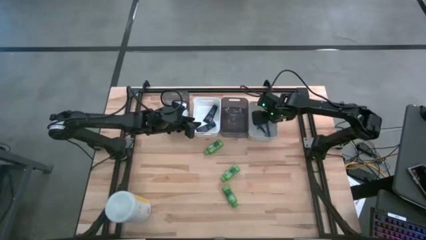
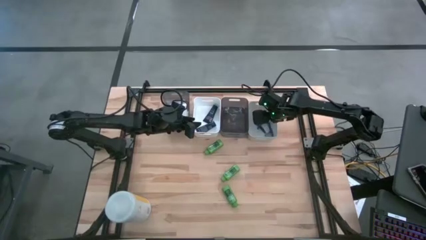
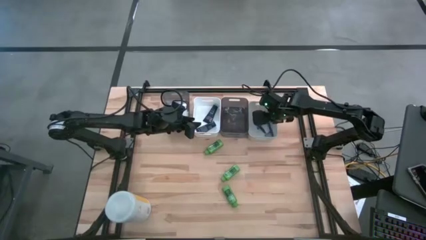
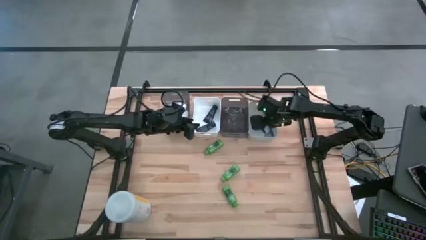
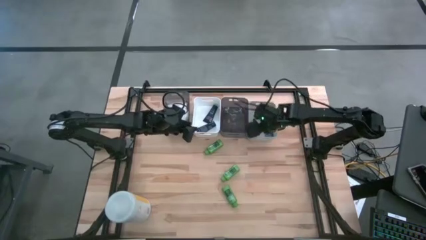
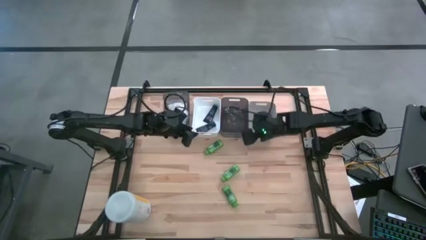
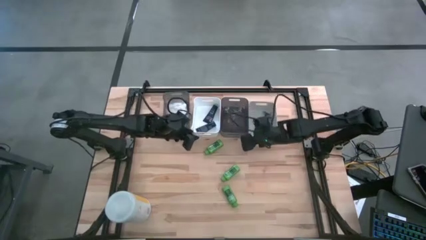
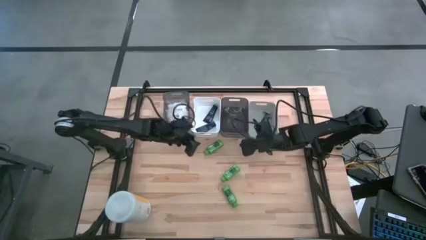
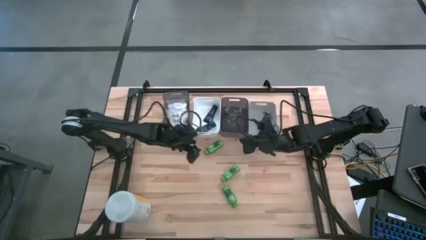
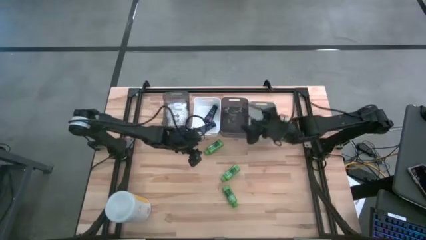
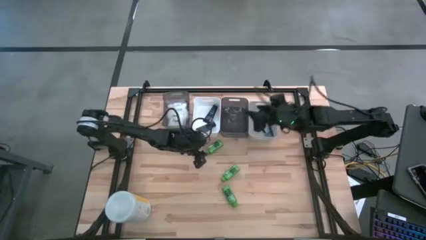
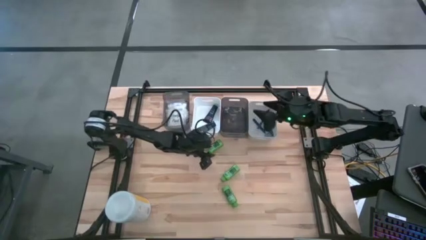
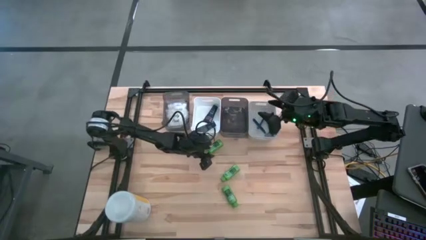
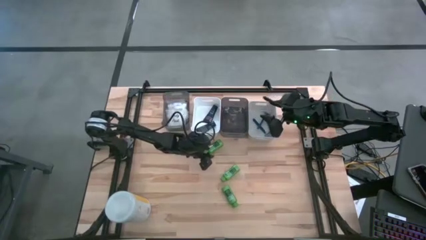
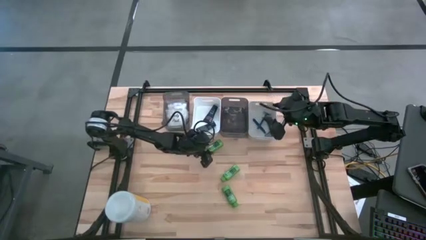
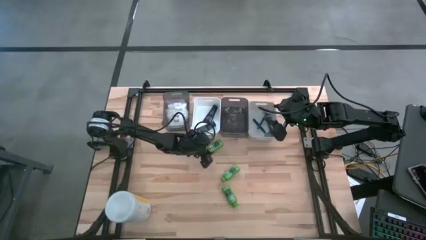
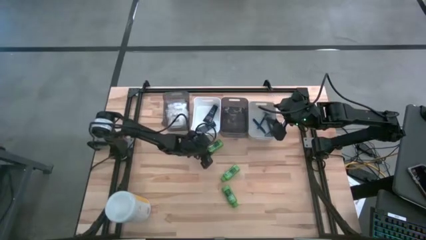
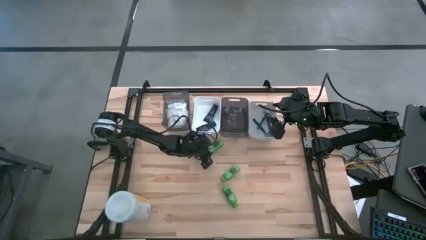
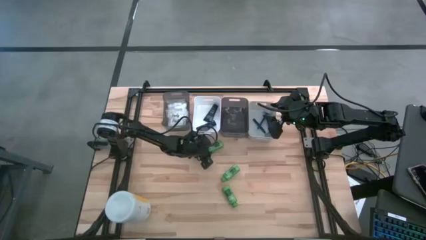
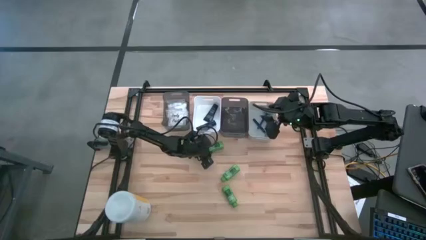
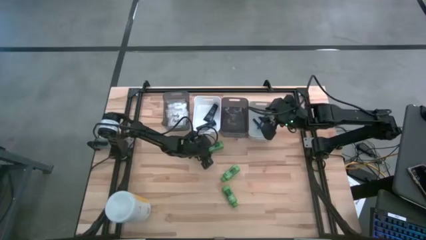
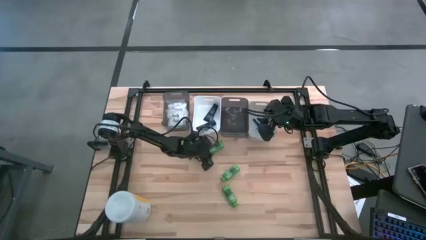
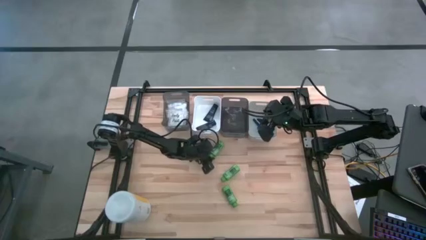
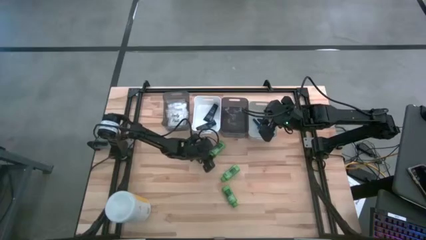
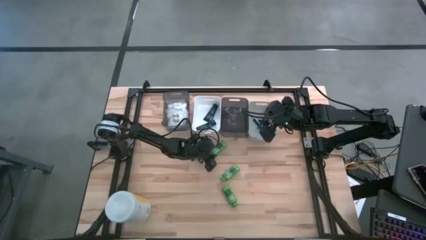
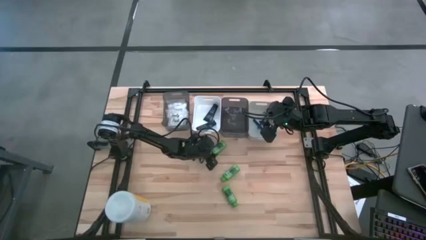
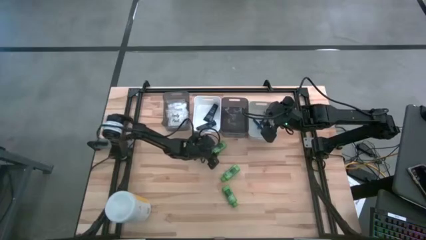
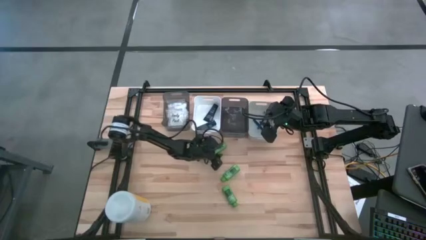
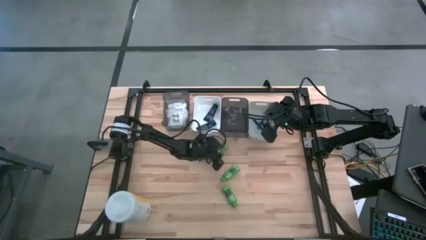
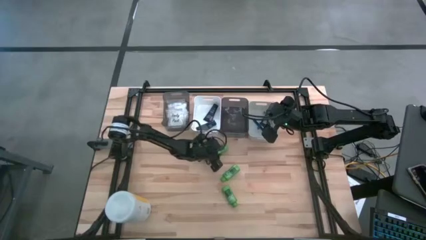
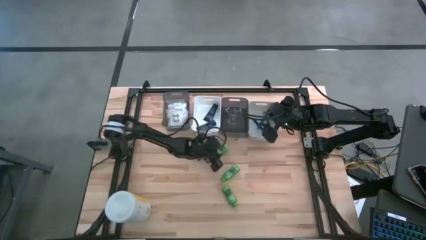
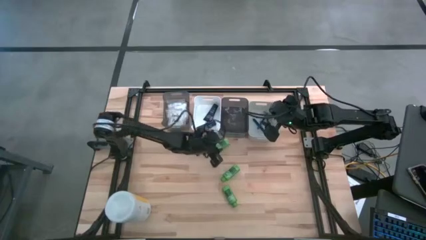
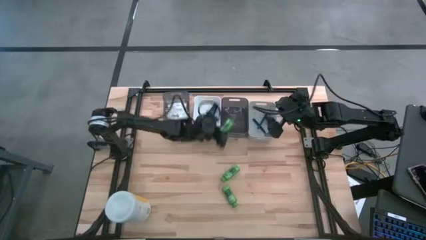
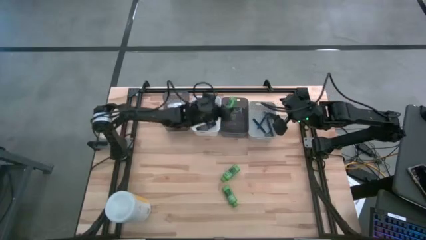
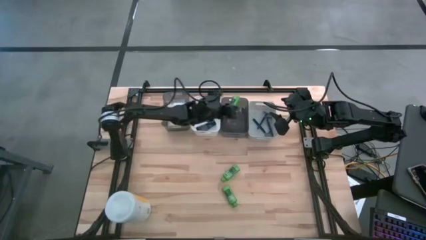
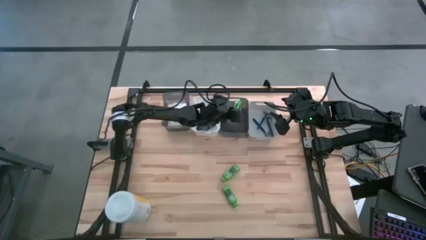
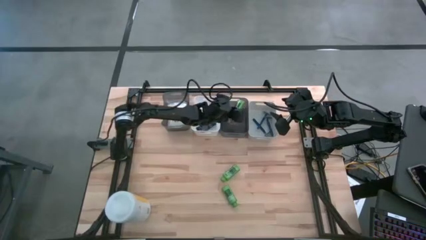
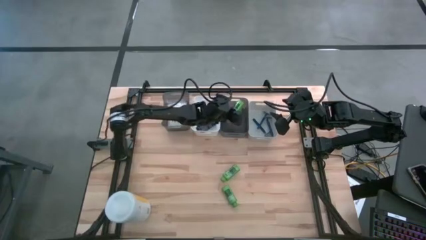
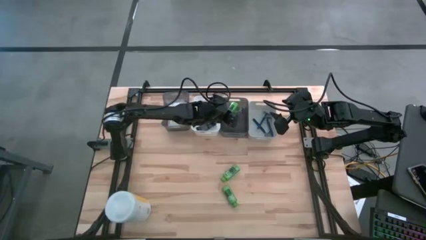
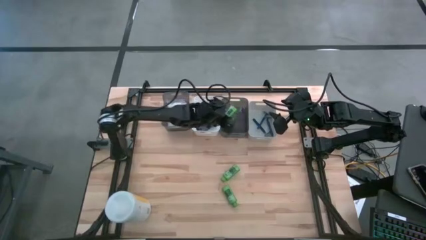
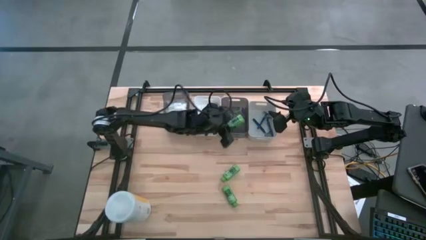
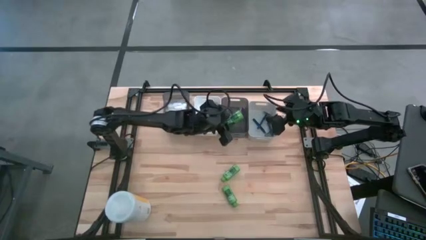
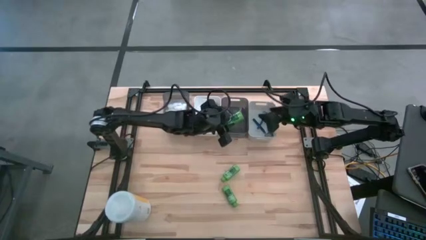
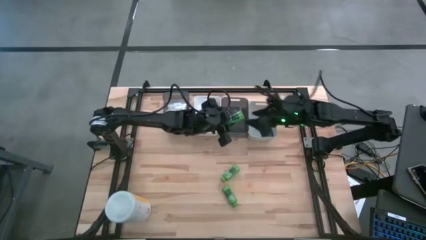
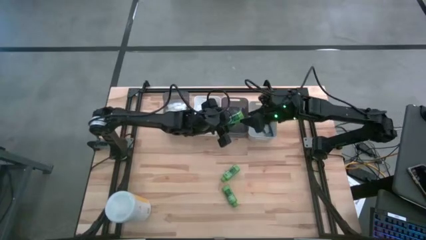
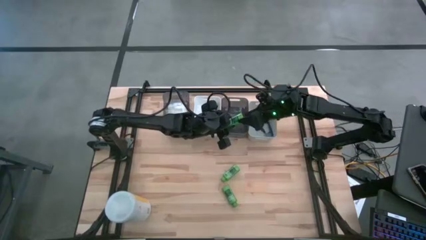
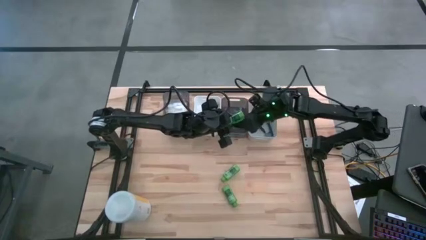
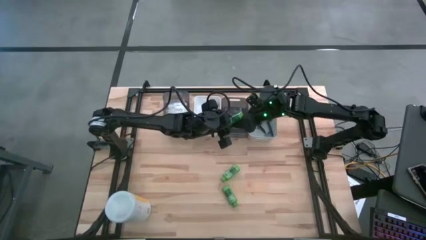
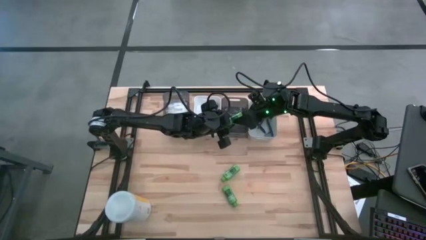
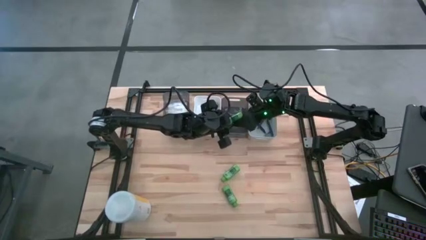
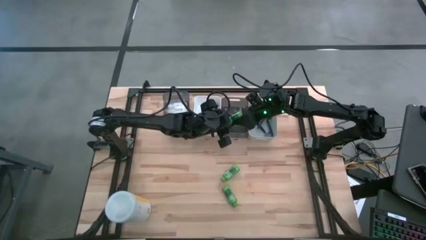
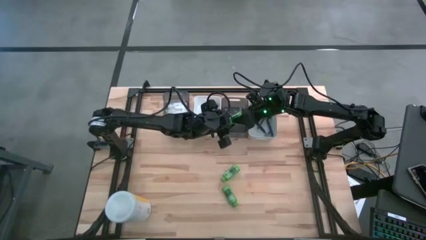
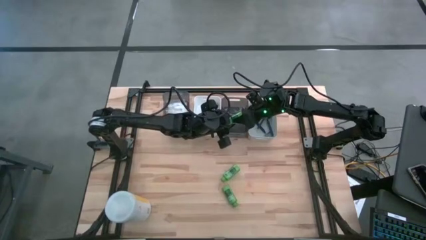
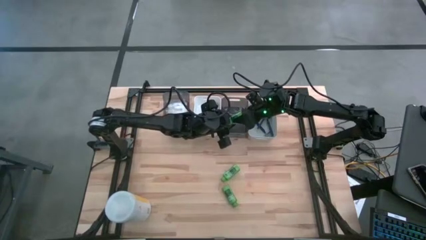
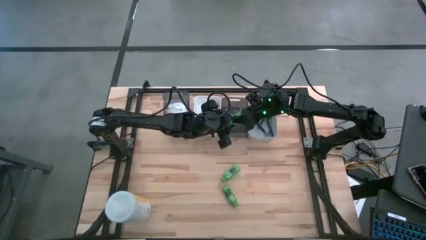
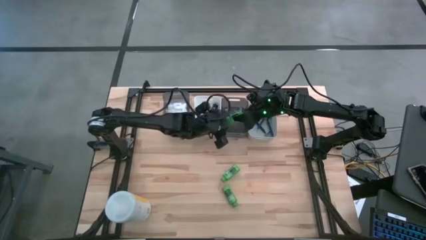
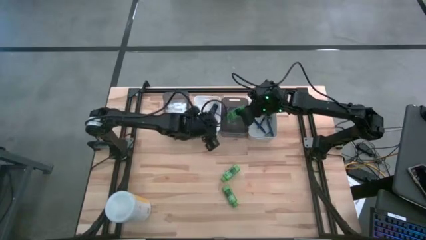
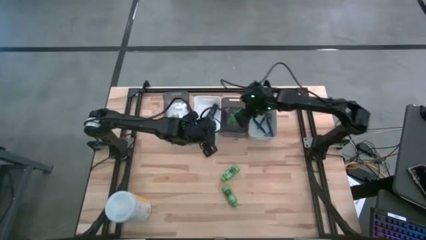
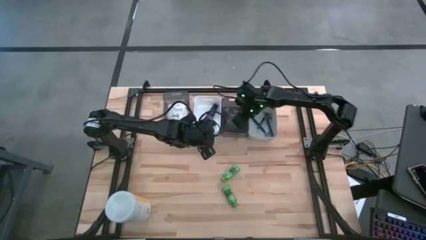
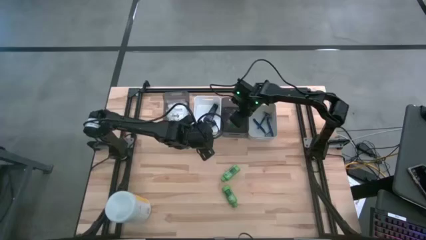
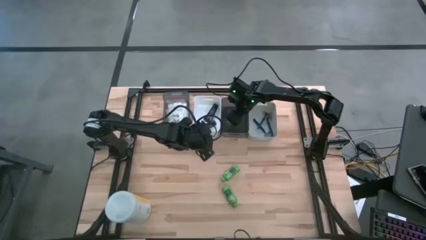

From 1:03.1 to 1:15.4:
Task: Pick & Place Travel size toiletries
Put the top shampoo into the right black bin

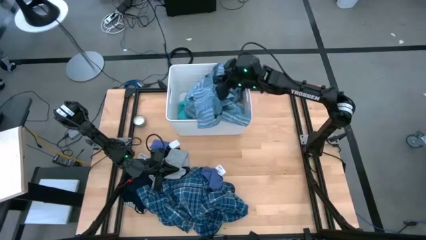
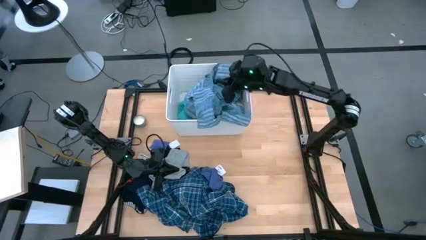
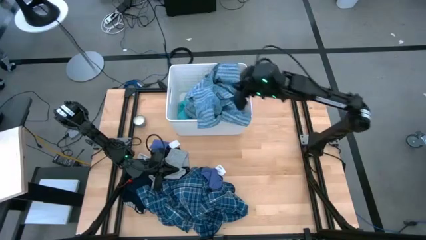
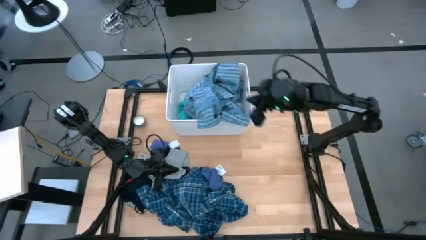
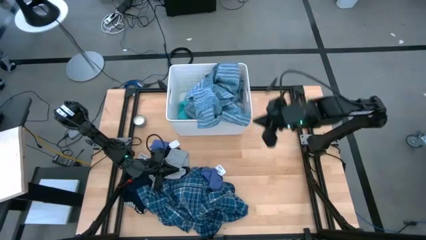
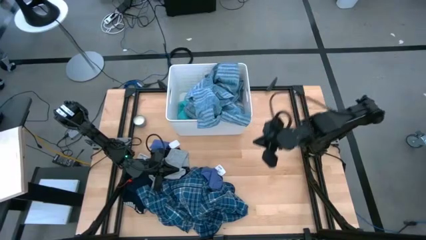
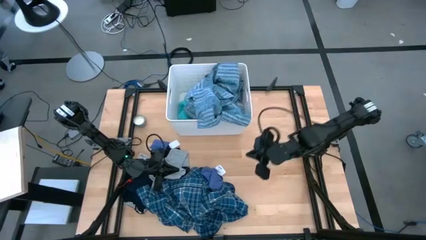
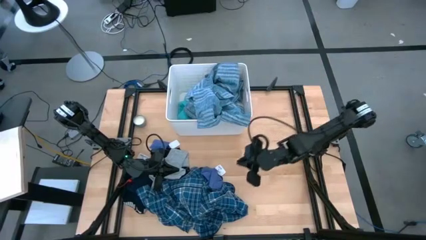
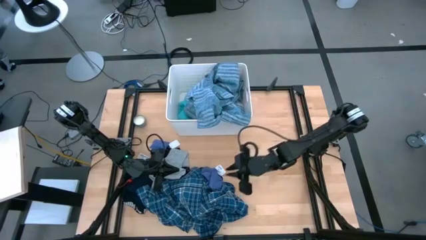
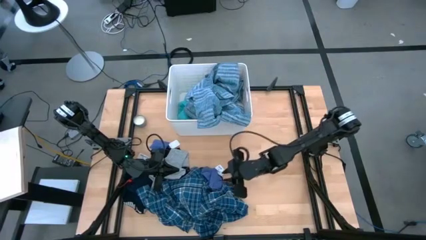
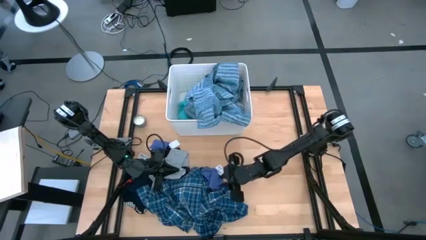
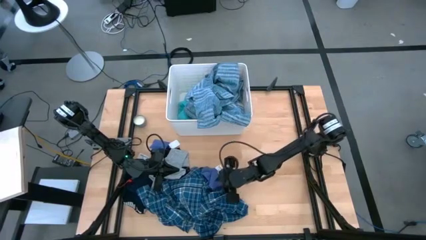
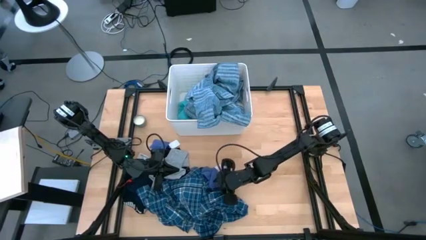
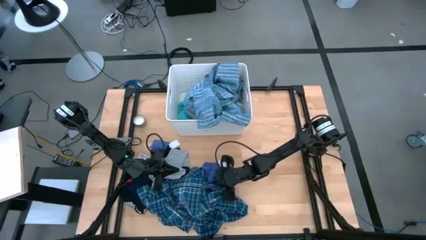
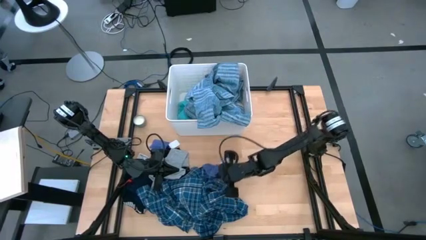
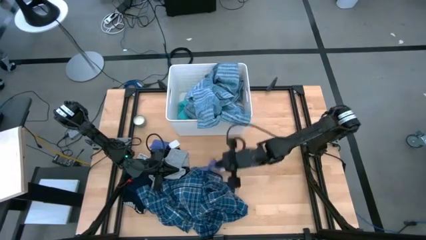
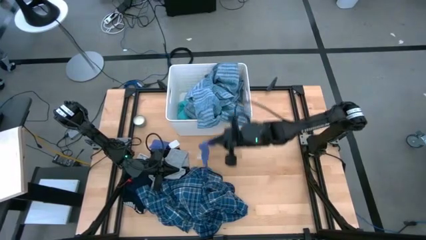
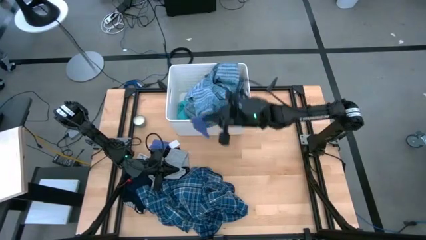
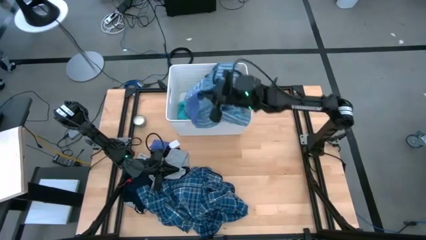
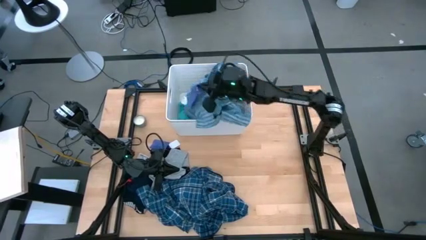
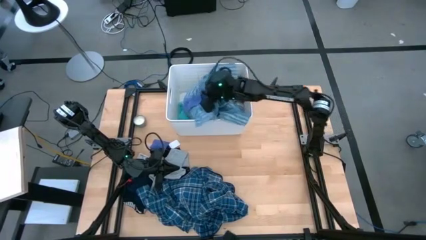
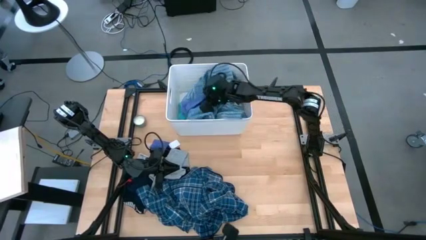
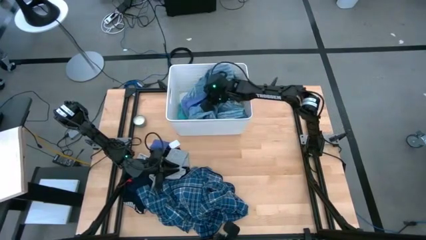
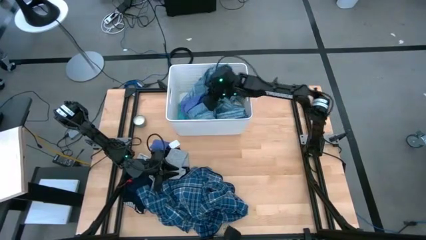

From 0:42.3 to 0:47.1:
Task: Sort clothes
Put the right purple sock into the white laundry bin
